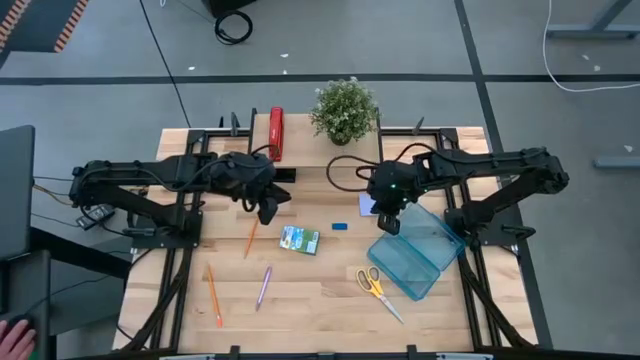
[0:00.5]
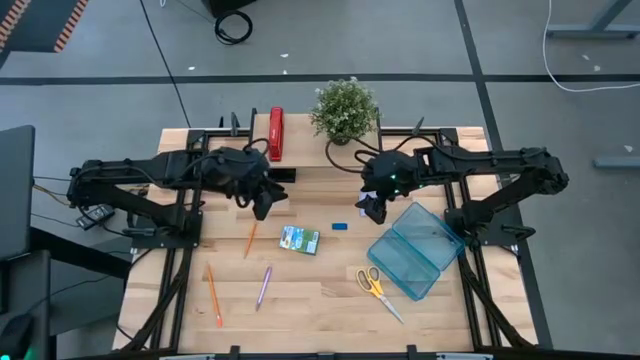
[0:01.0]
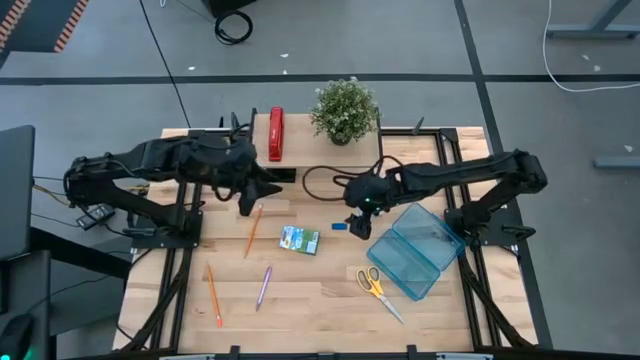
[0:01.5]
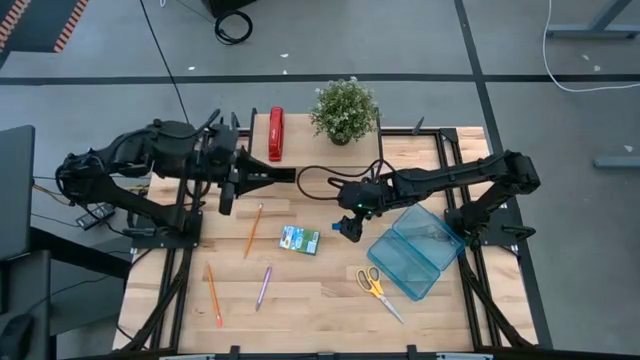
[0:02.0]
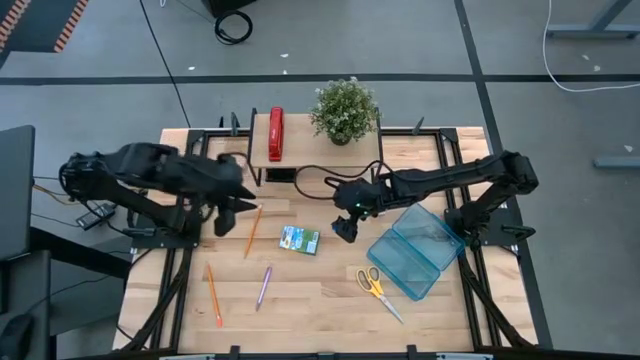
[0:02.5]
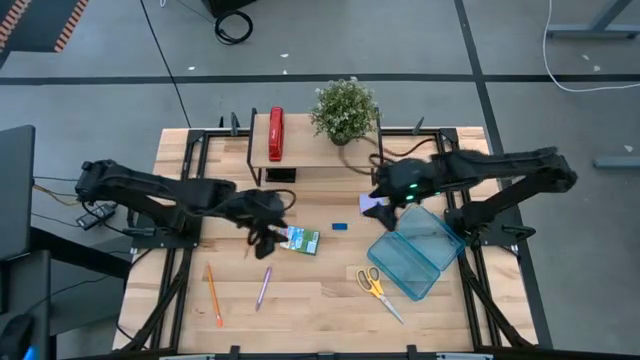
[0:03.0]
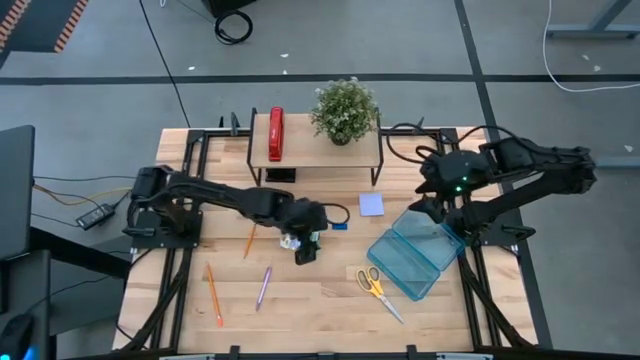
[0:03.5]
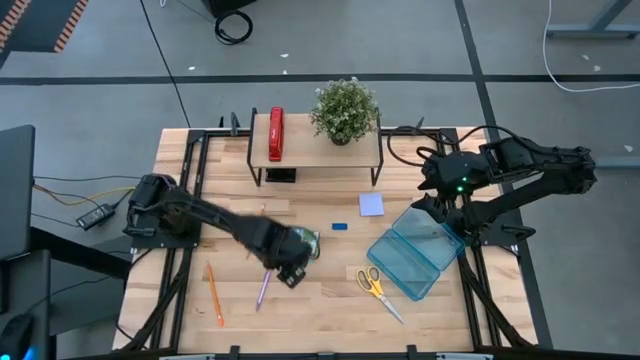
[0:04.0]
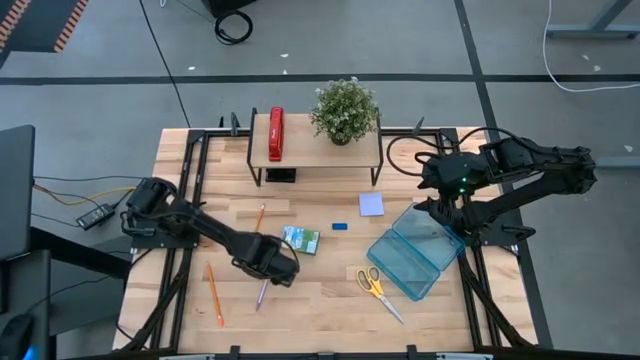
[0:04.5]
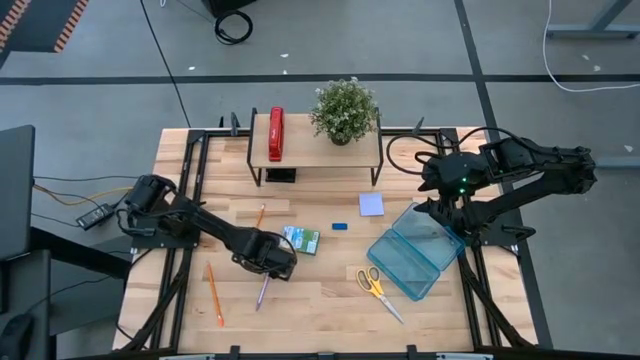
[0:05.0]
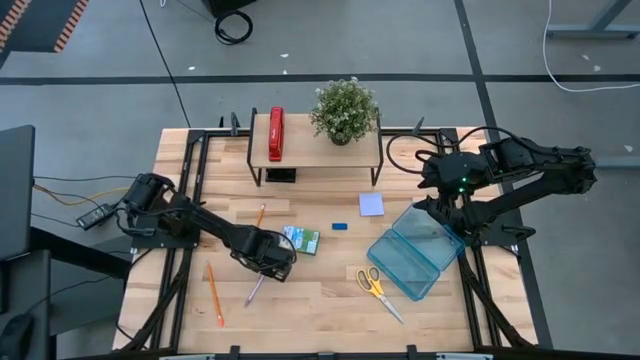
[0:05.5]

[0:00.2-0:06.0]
Task: Pack school essentials
Put the violet pen into the blue supply box

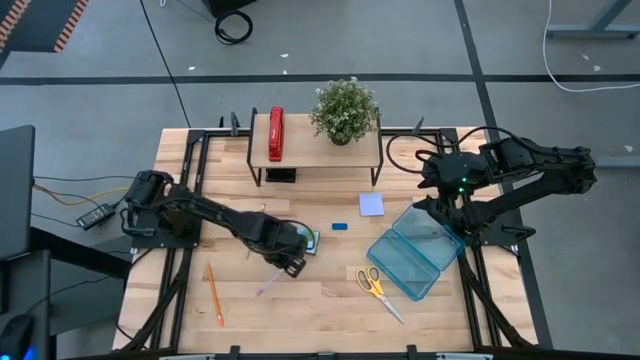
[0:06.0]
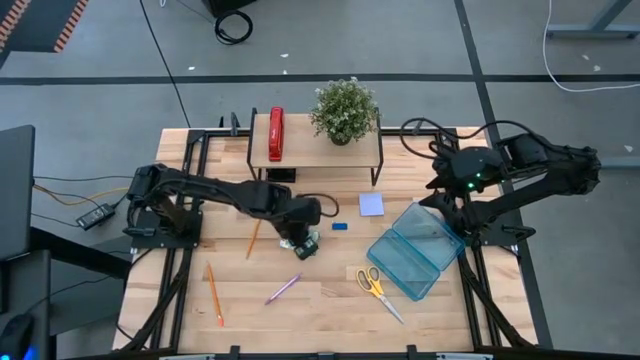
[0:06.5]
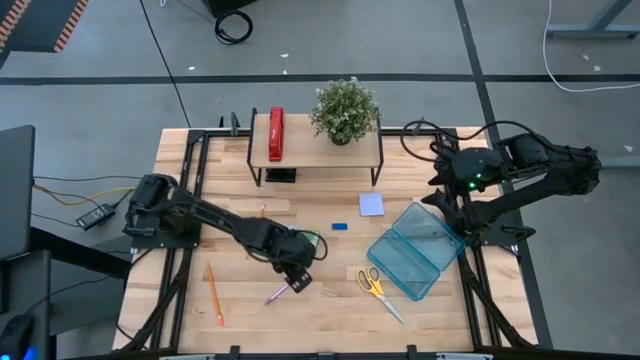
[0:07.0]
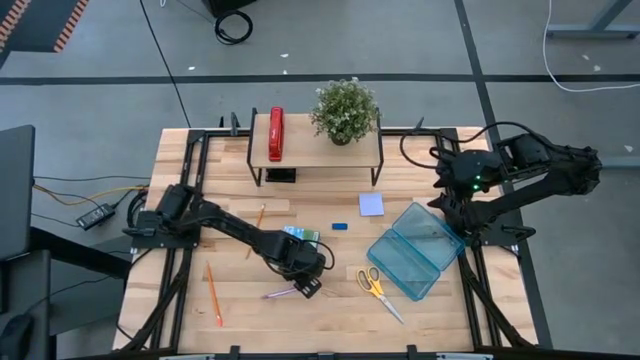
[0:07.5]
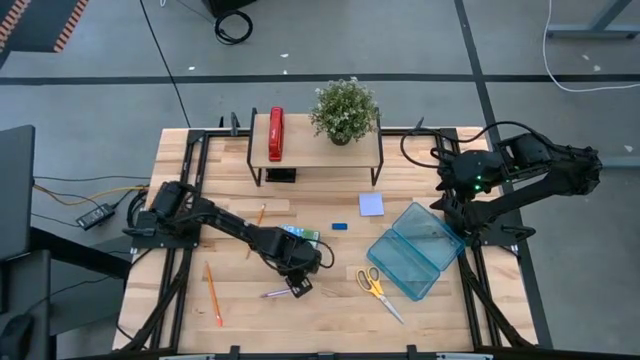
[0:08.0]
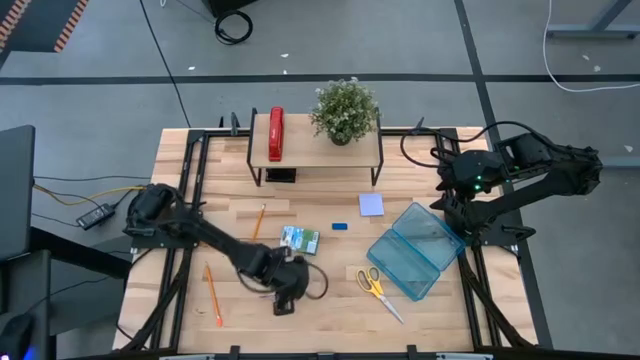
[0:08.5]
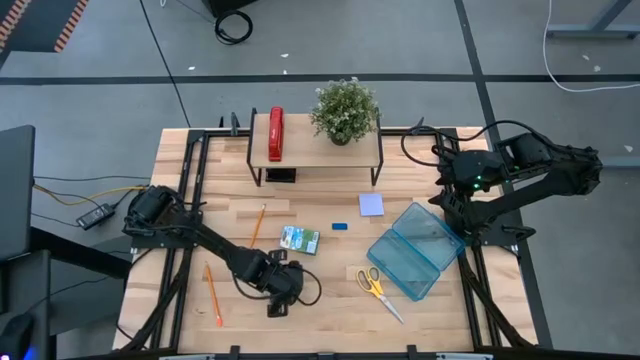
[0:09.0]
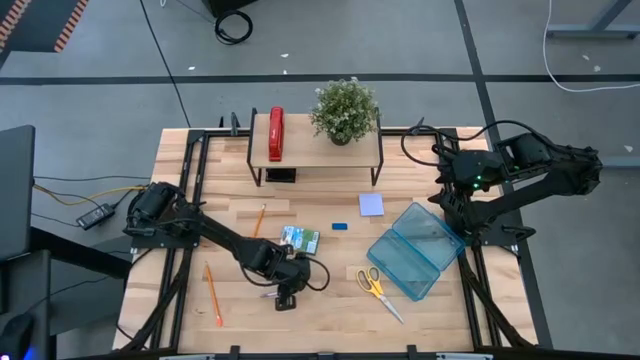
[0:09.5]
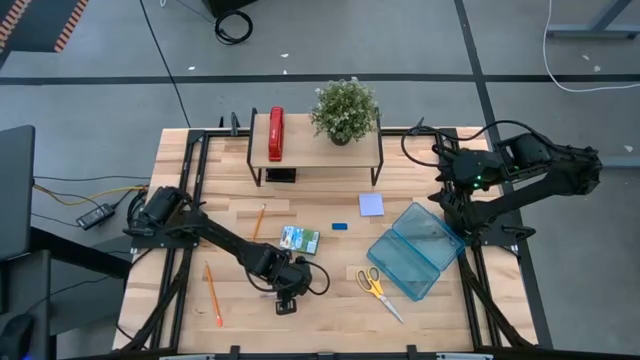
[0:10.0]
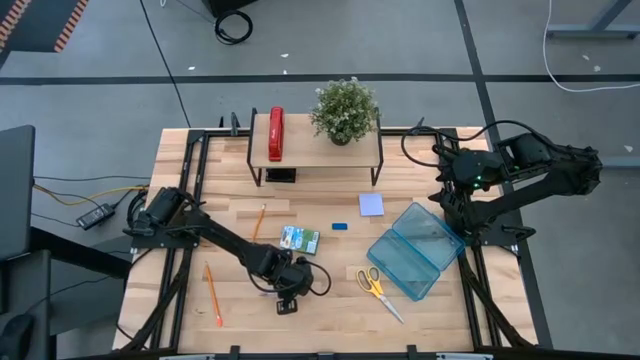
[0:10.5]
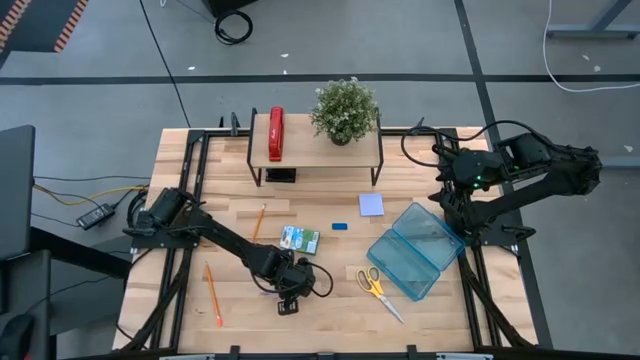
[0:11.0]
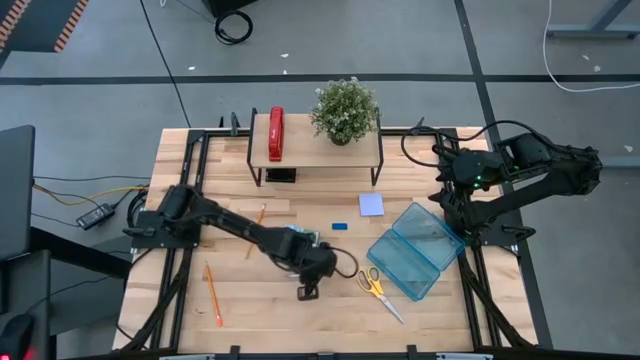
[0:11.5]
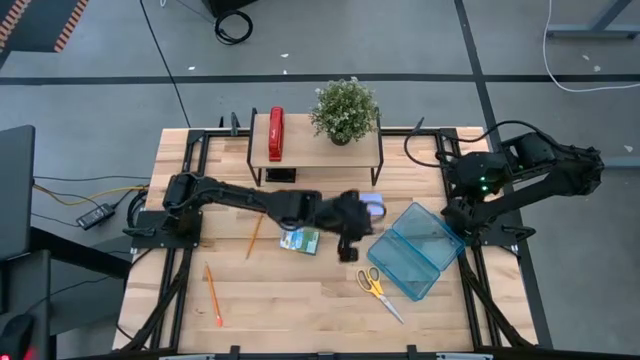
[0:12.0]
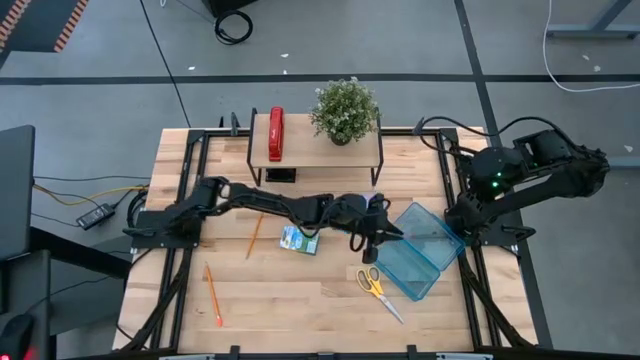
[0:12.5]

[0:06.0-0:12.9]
Put the violet pen into the blue supply box

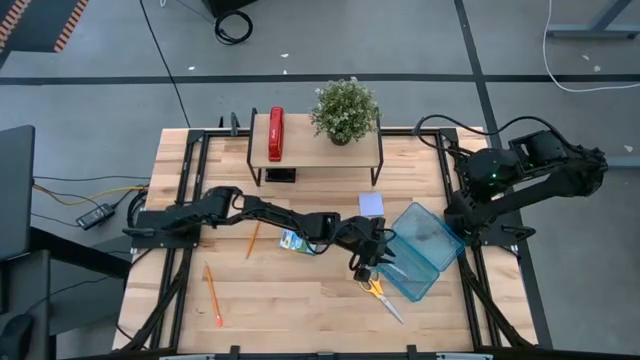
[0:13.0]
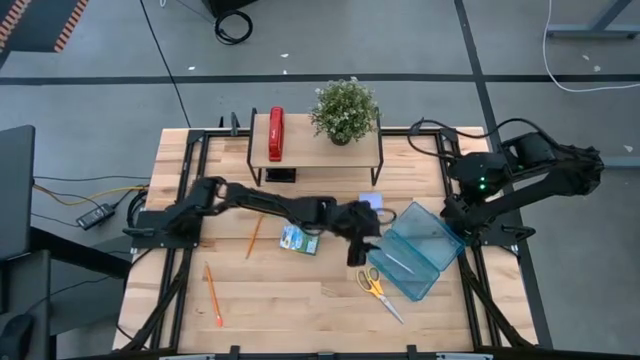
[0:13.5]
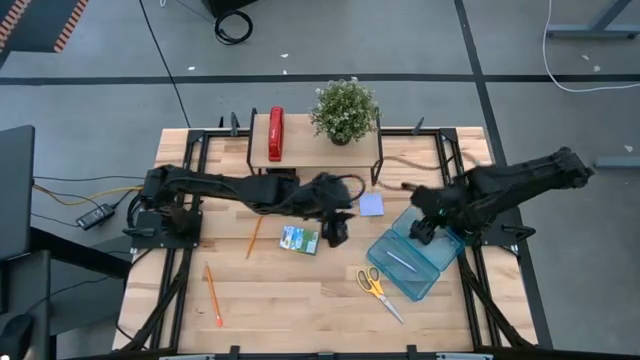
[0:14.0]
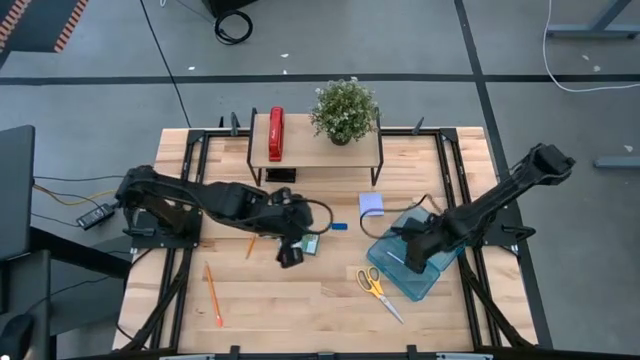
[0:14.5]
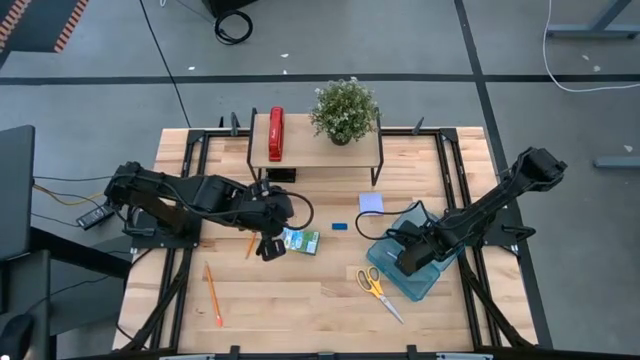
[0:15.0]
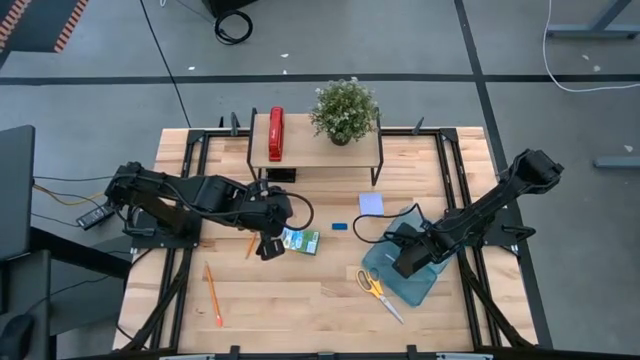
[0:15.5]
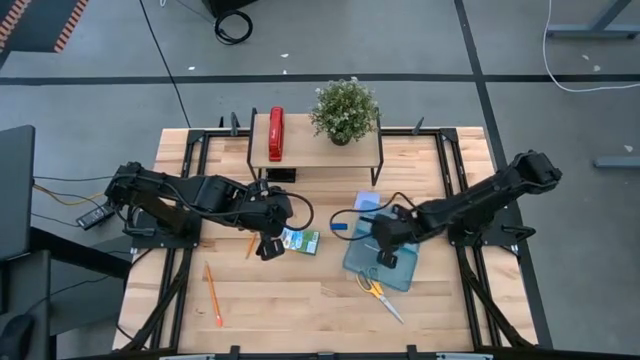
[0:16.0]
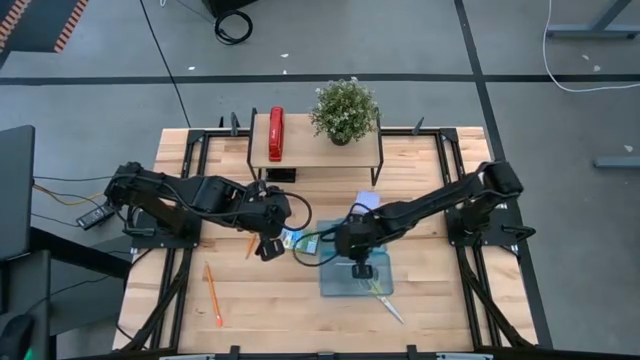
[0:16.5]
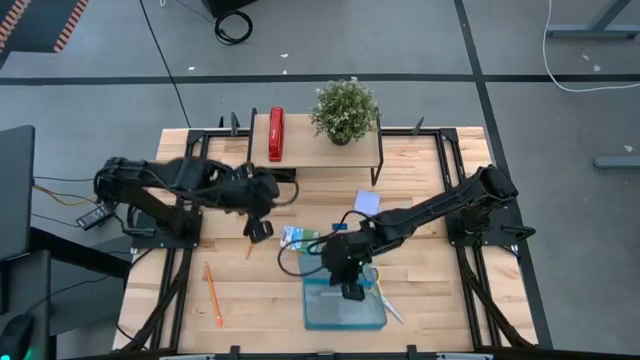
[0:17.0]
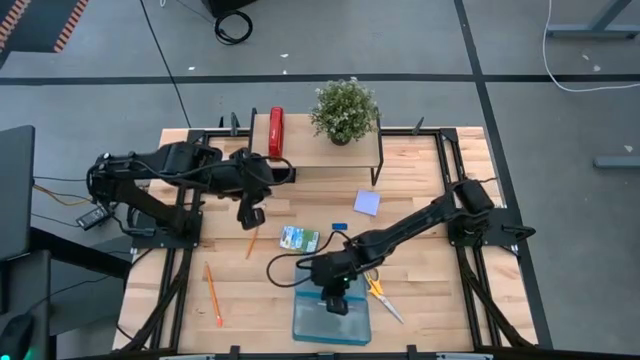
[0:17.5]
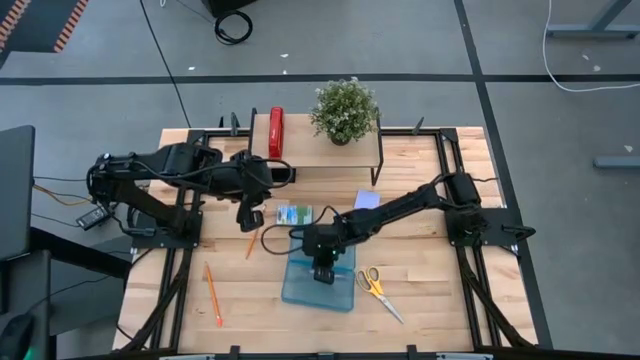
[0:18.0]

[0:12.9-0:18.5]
Move the blue supply box to the center of the table

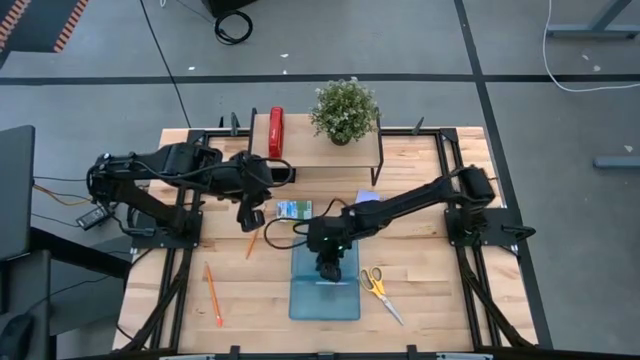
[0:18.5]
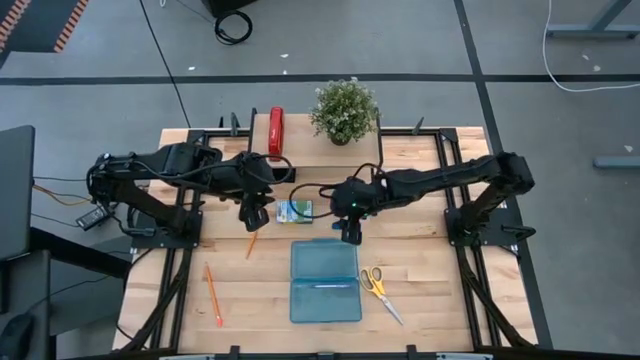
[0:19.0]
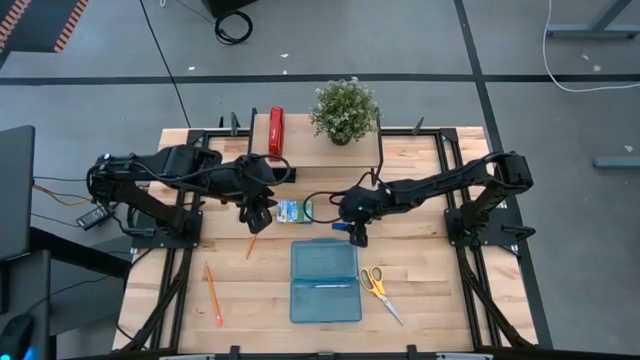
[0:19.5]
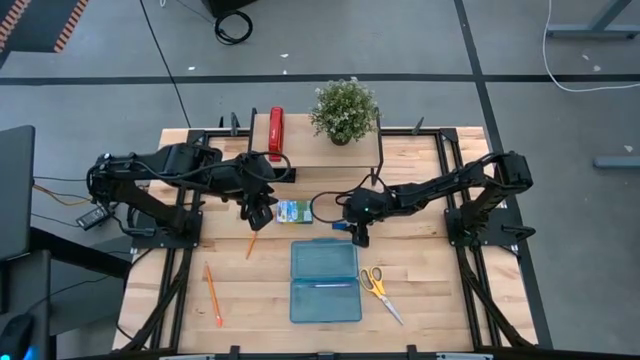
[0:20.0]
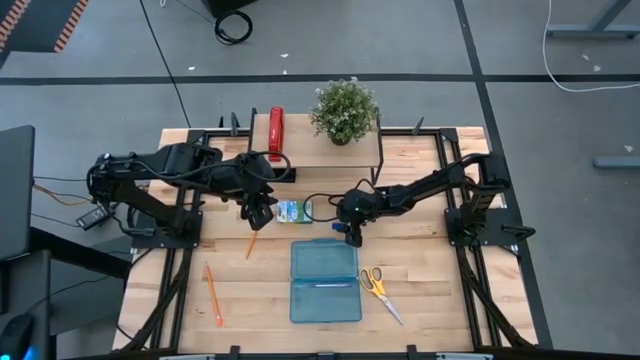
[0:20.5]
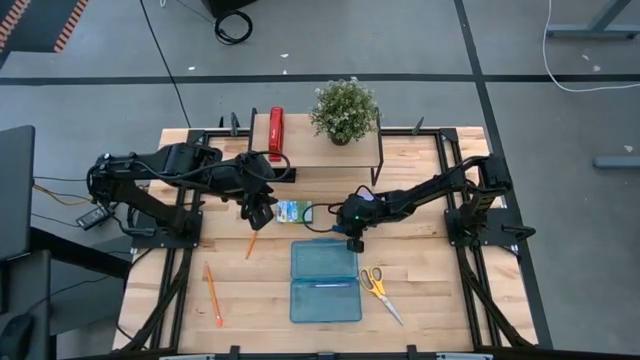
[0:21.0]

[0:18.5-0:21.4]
Put the blue eraser into the blue supply box
